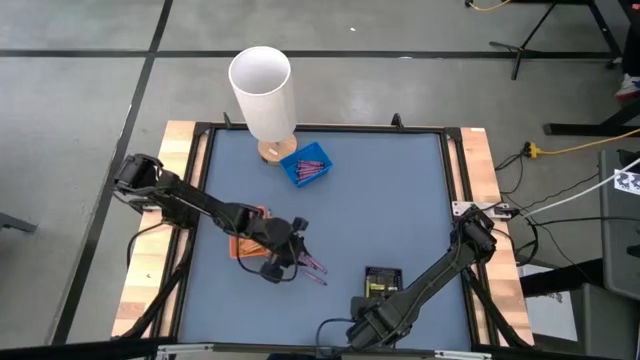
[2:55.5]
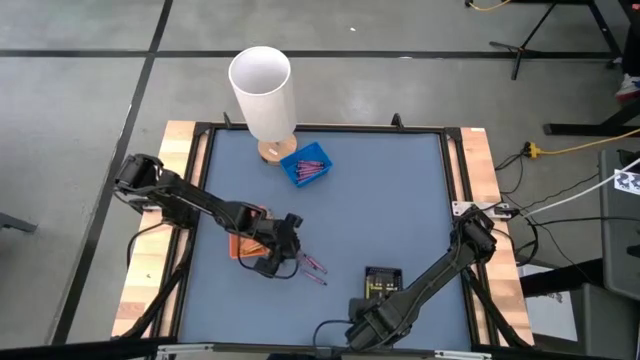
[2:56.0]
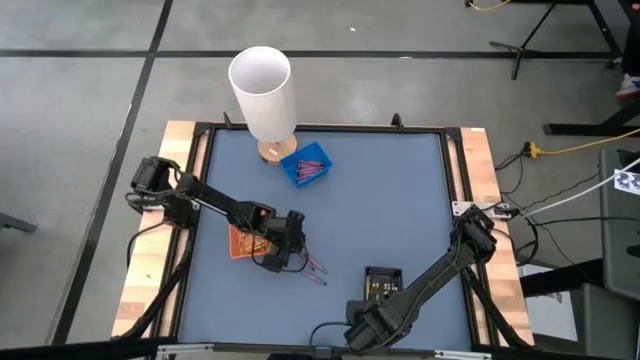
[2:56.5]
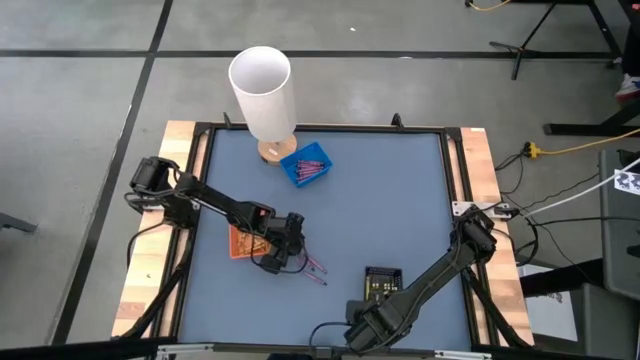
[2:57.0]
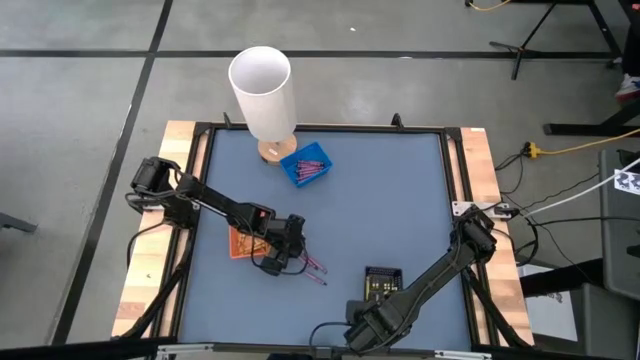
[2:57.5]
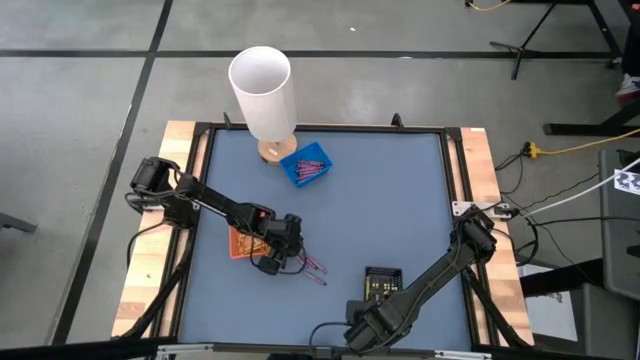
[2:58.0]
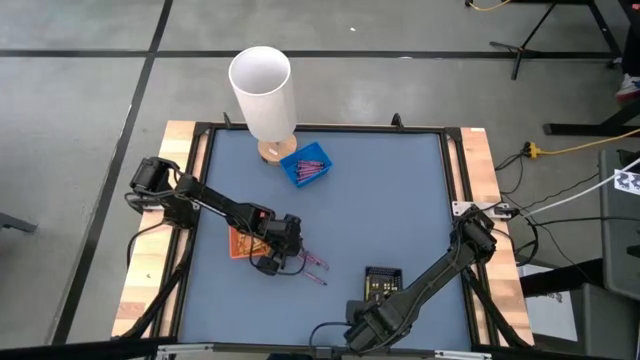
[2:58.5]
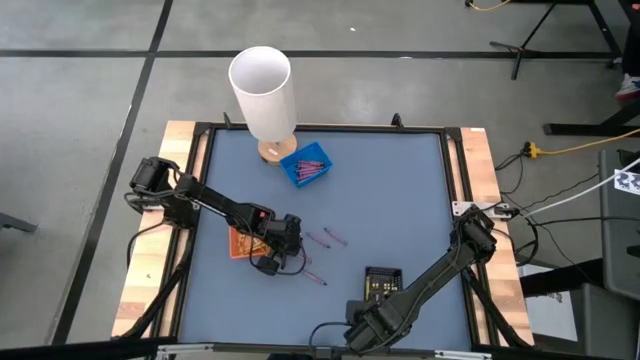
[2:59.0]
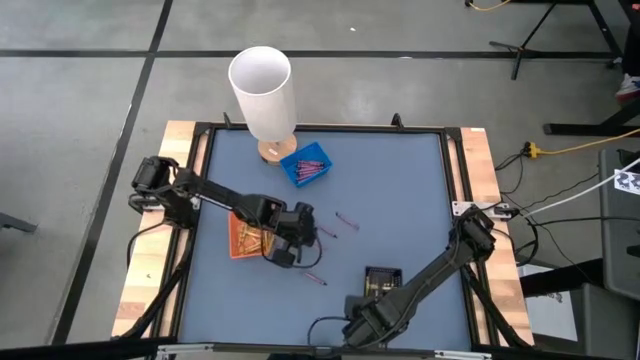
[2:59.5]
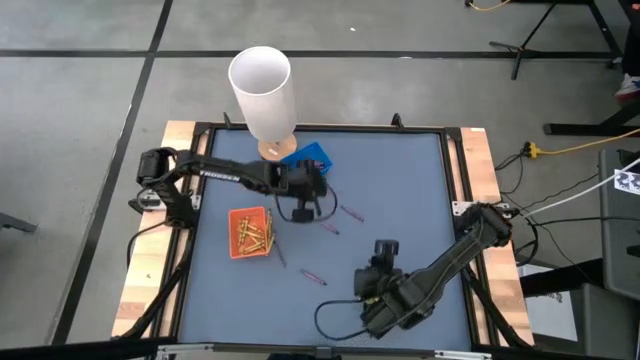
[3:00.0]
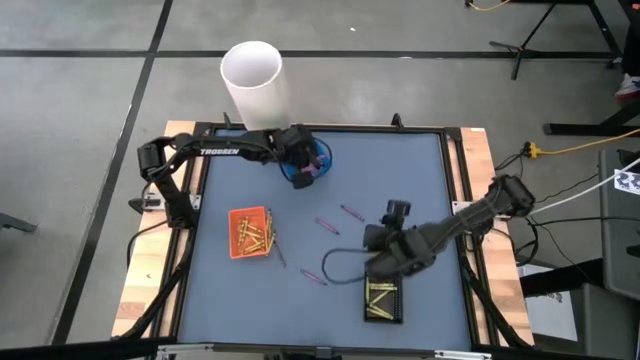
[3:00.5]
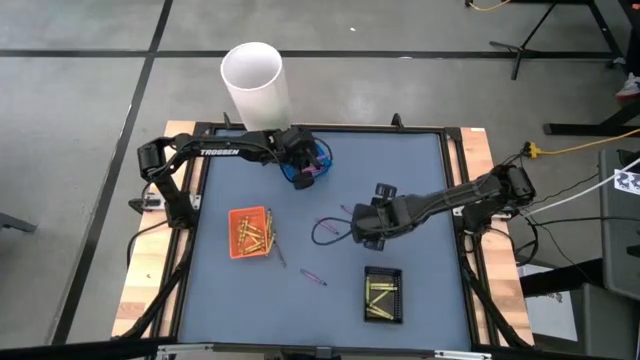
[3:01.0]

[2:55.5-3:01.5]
Task: Sort crayons
Put the violet crayon into the blue bin

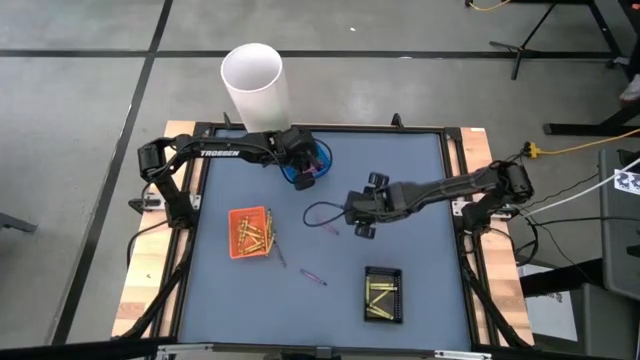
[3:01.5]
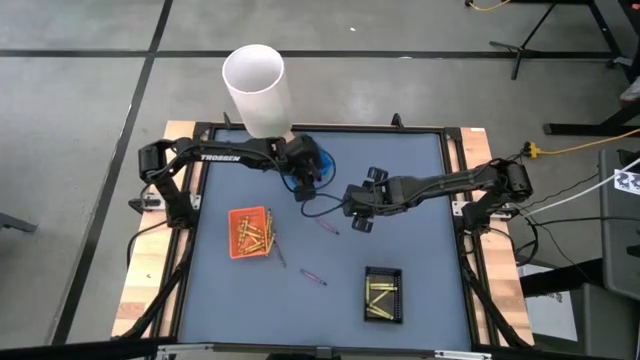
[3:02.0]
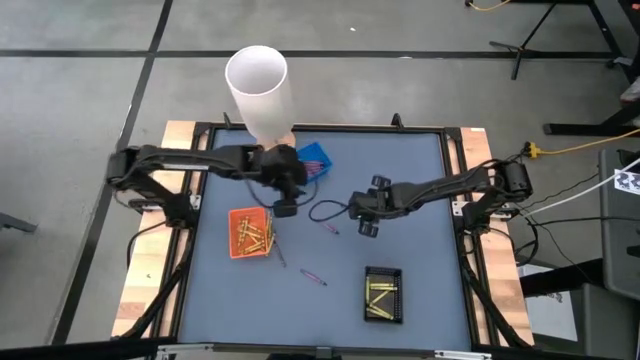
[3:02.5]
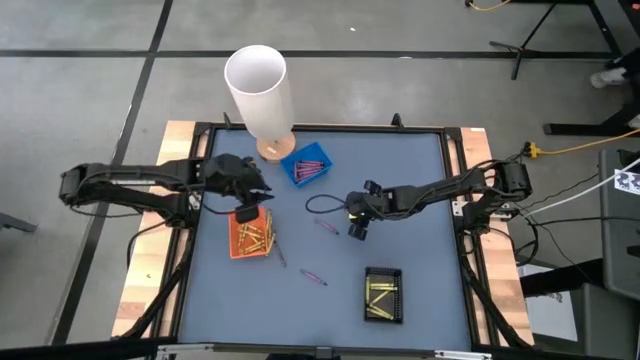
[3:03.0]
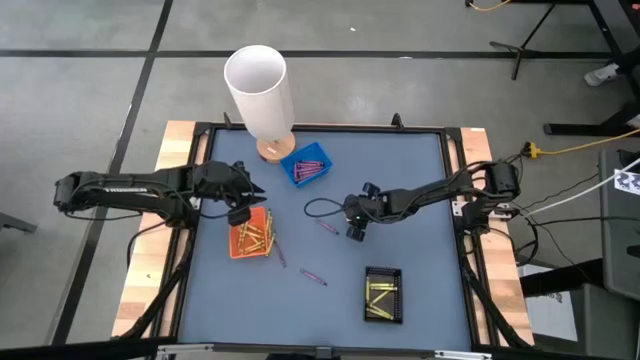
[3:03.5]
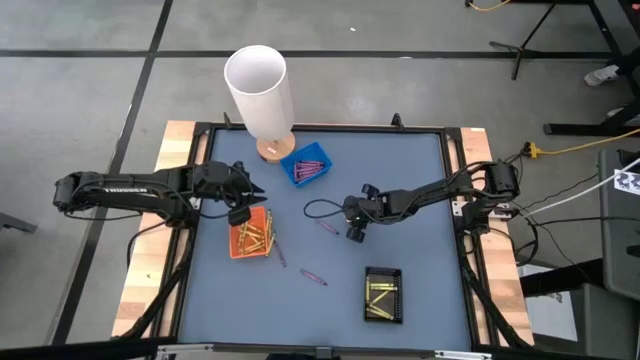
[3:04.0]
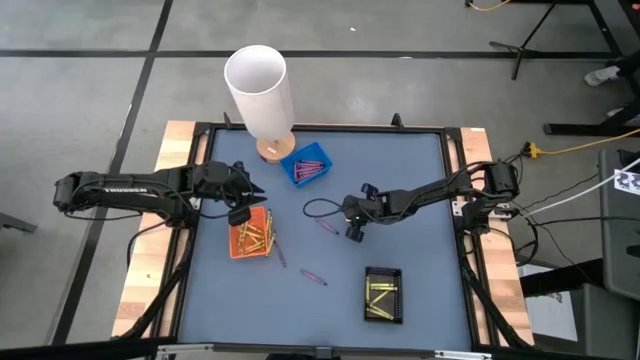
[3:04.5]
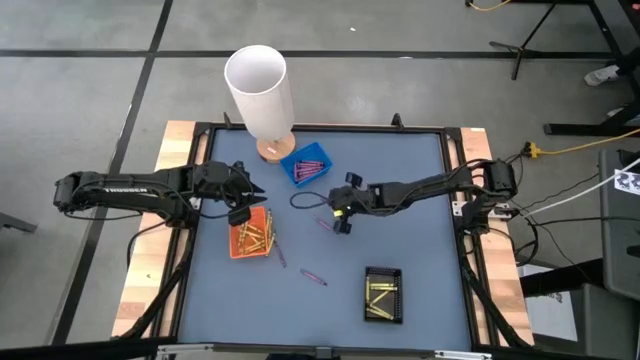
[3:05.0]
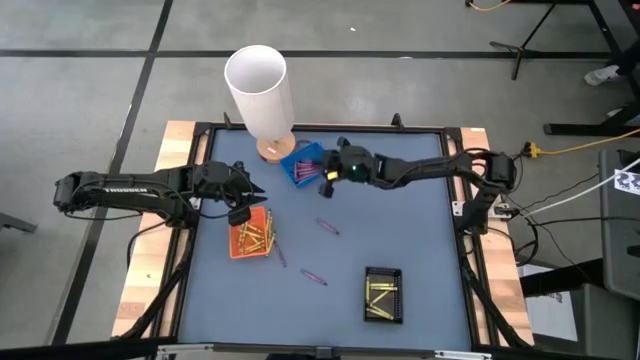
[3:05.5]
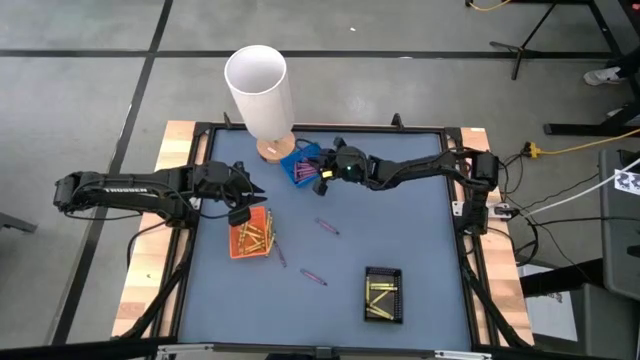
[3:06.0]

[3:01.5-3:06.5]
Put the violet crayon into the blue bin

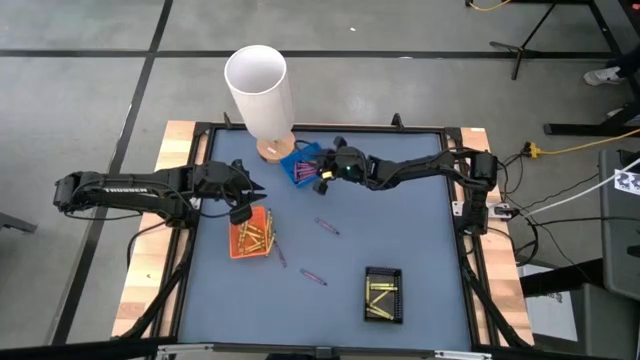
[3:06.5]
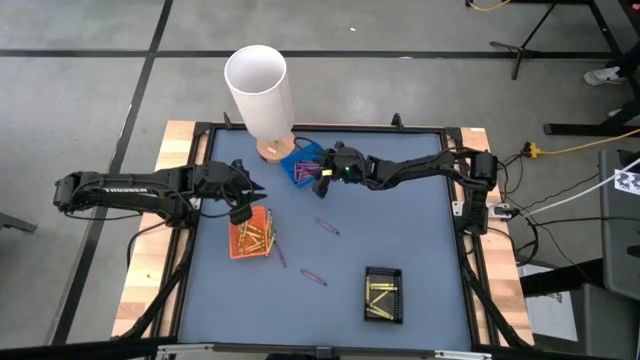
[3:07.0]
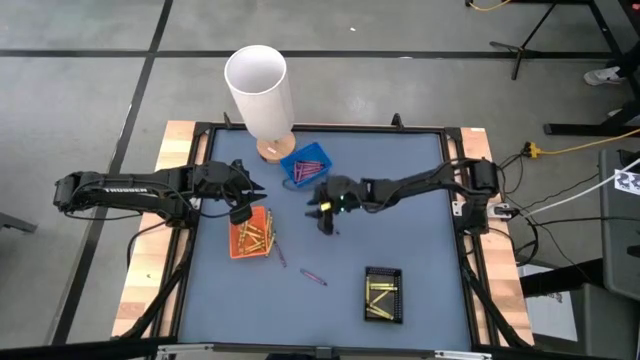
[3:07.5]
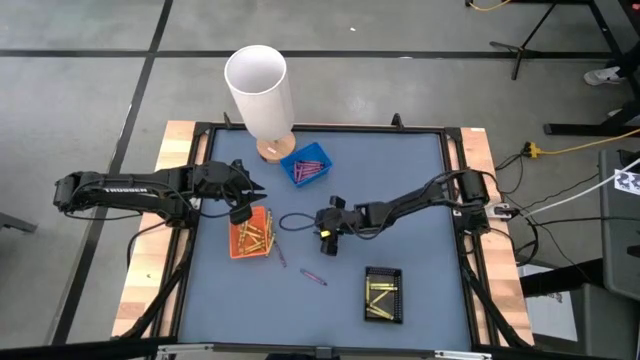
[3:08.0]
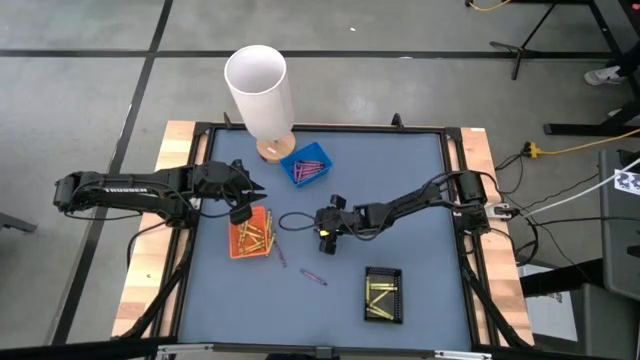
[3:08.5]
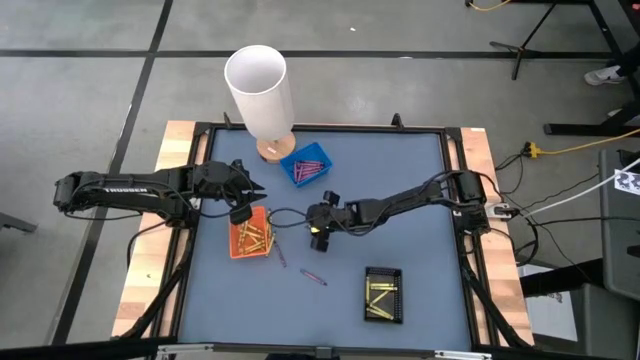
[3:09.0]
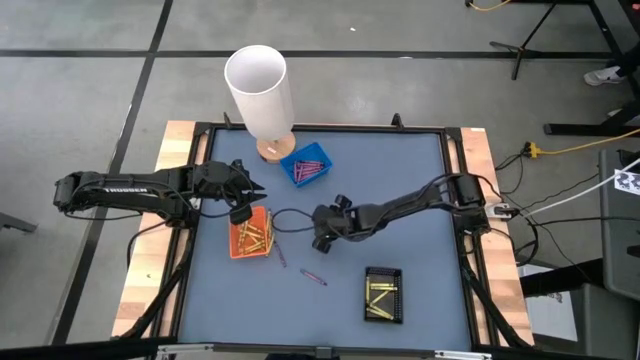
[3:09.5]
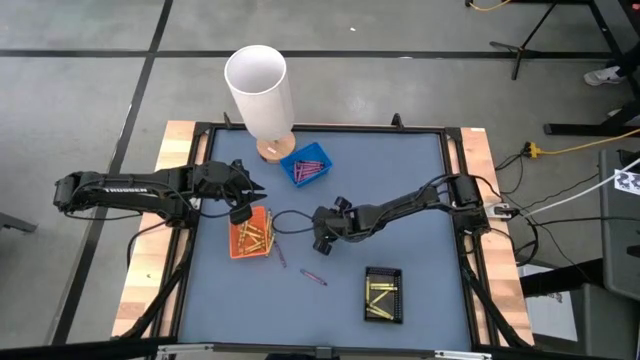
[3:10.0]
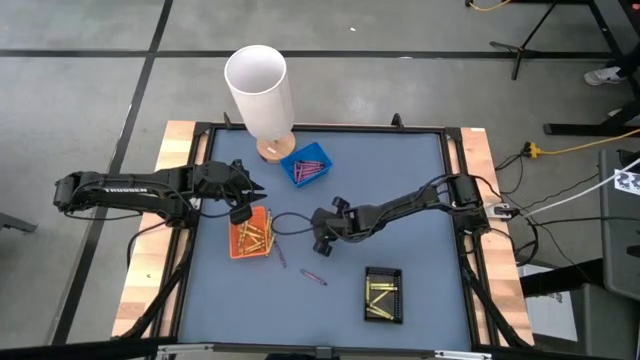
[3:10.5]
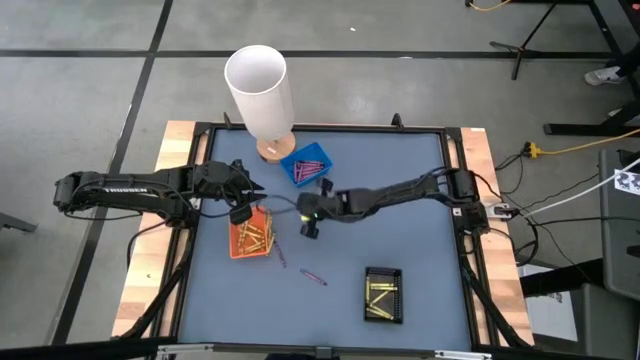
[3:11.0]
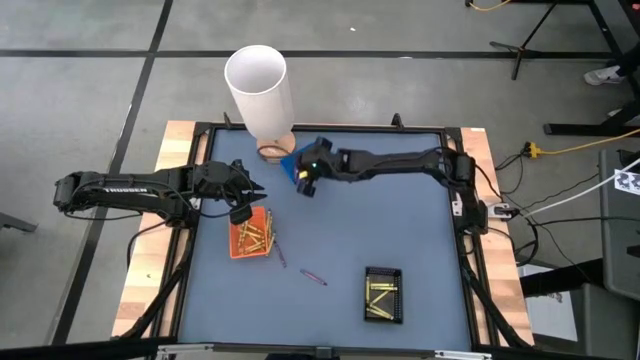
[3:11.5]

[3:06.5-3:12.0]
Put the violet crayon into the blue bin

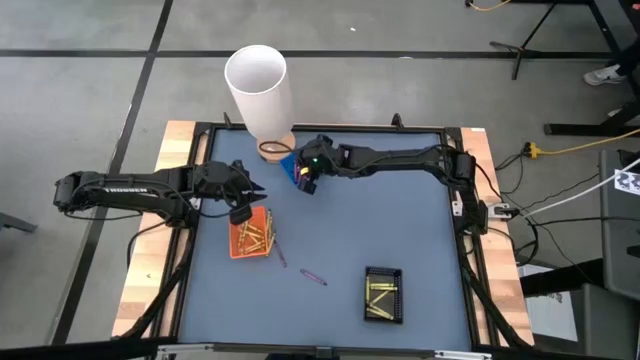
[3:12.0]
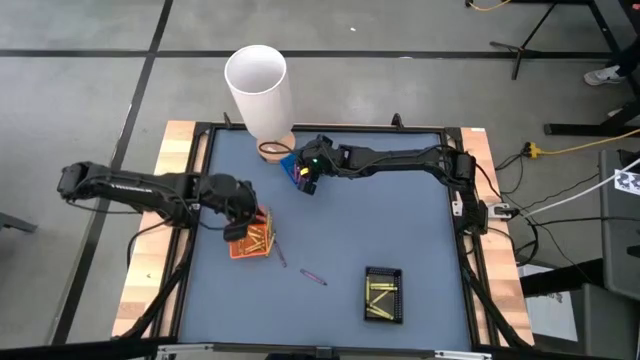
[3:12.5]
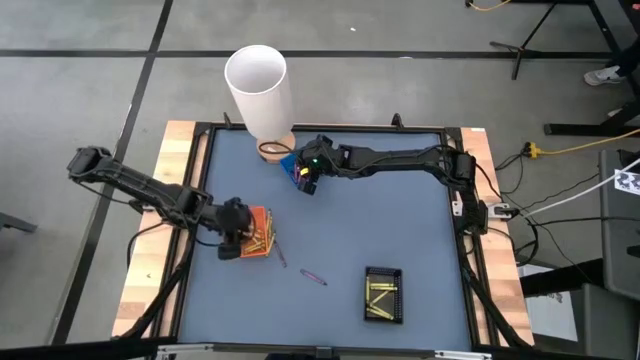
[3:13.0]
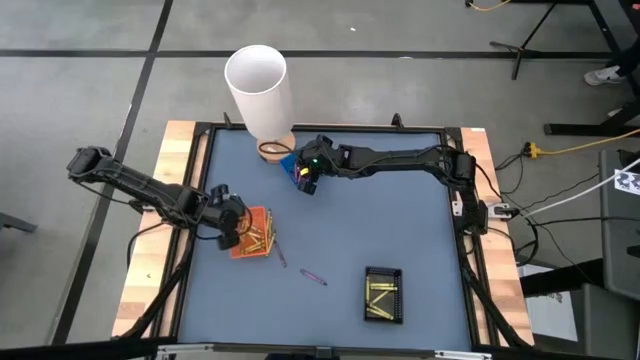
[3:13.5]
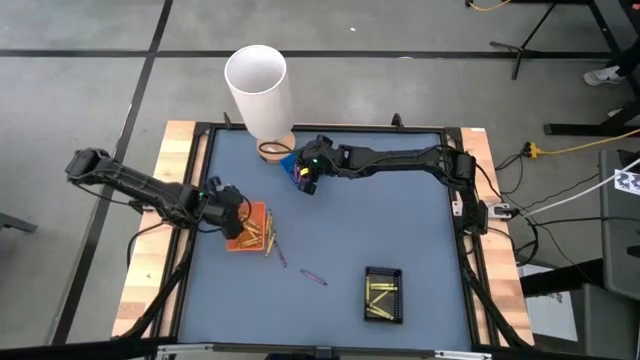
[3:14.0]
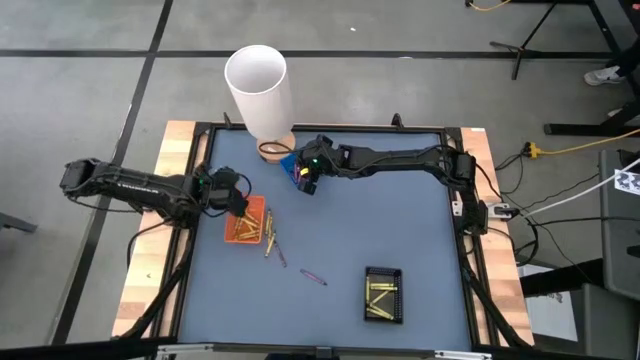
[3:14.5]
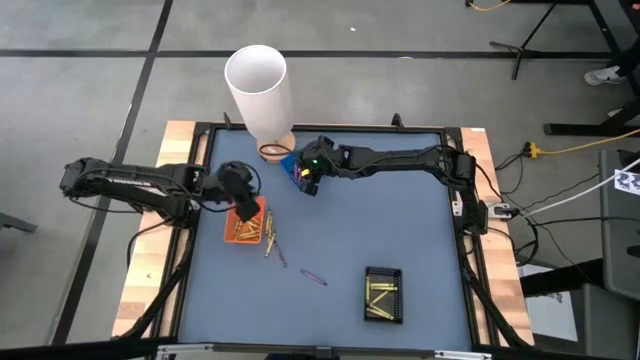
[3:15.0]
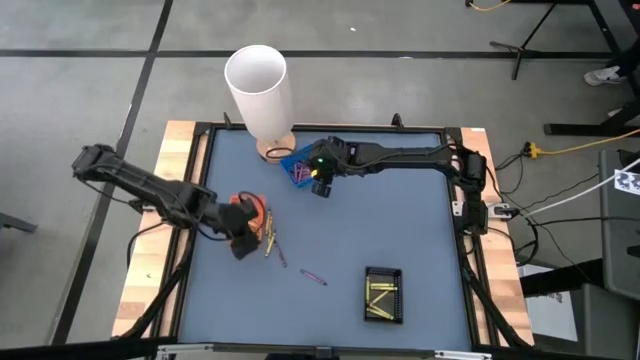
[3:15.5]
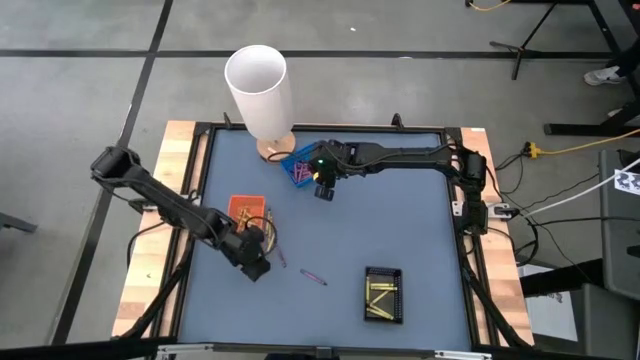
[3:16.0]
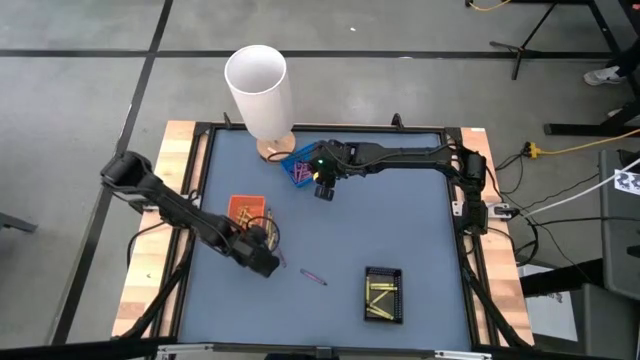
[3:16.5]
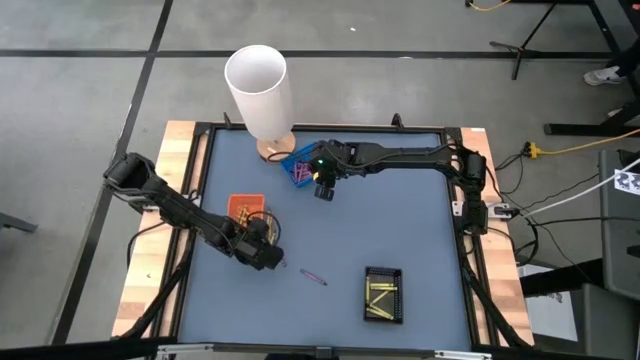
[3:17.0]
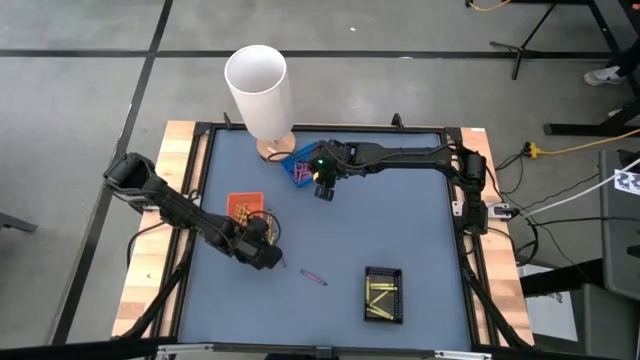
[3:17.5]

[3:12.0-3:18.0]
Adjust the orange bin
